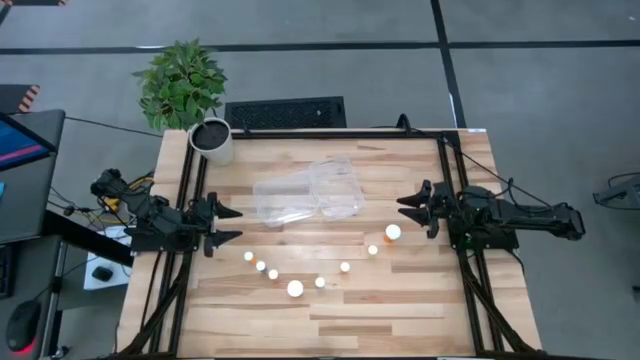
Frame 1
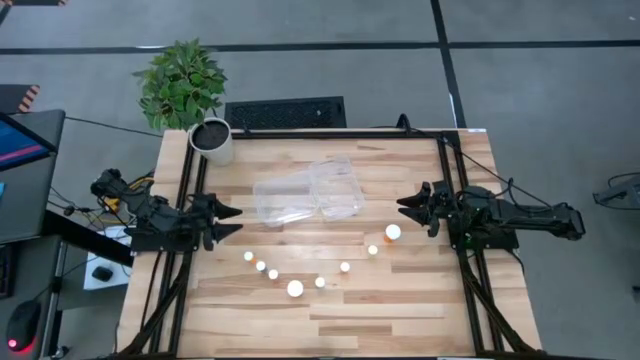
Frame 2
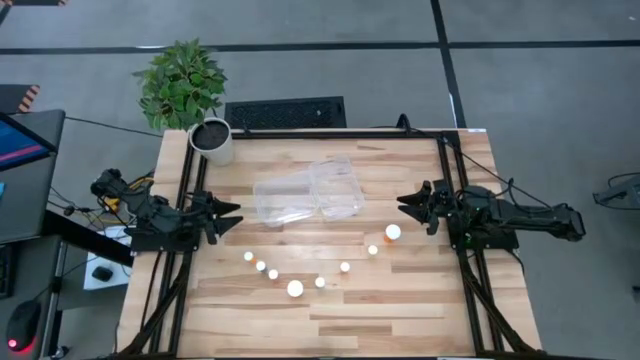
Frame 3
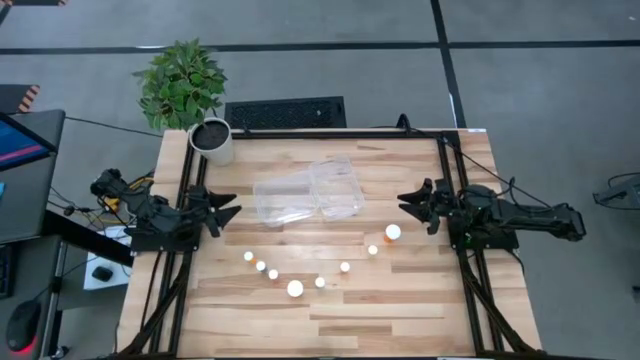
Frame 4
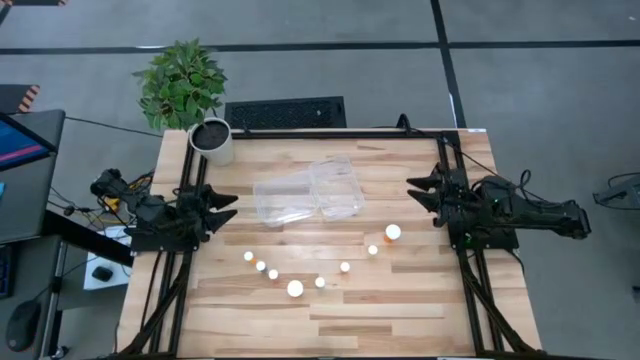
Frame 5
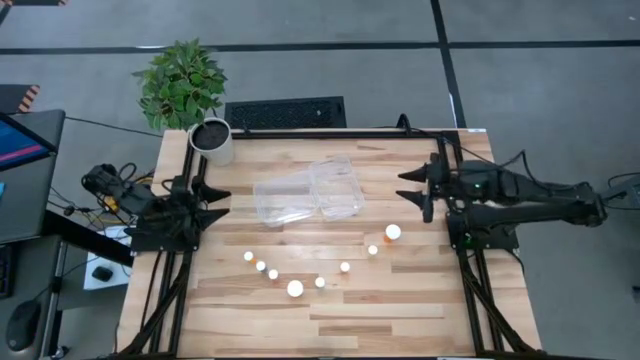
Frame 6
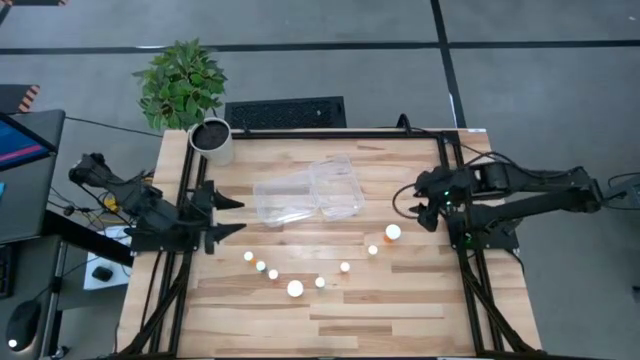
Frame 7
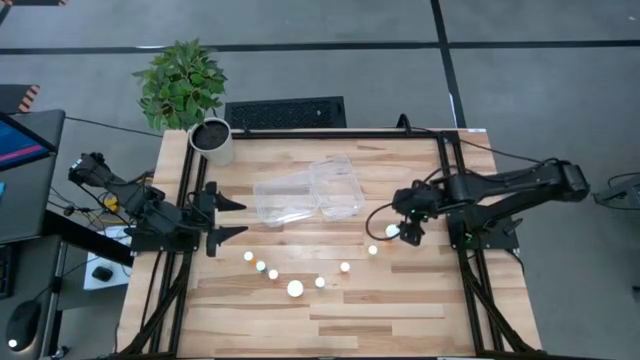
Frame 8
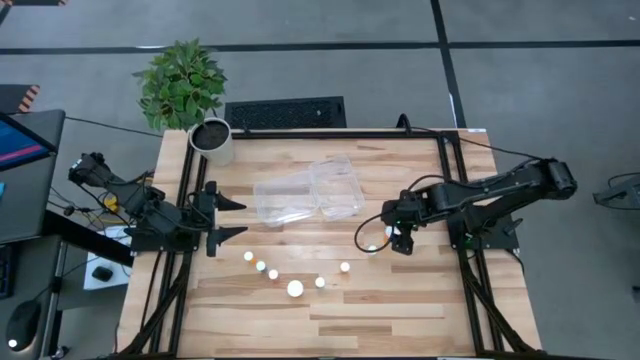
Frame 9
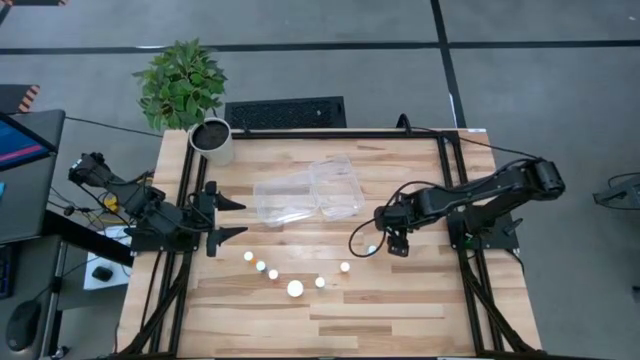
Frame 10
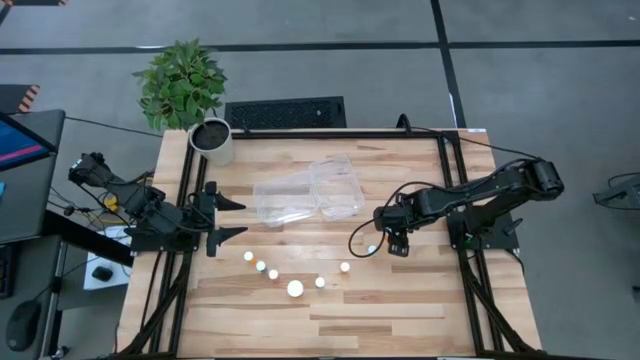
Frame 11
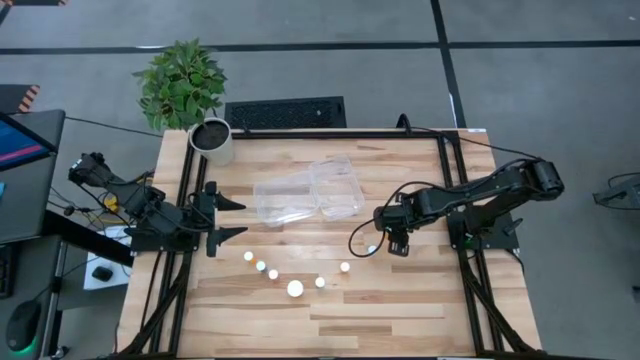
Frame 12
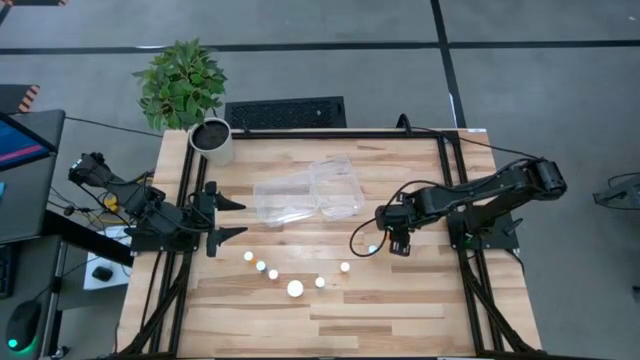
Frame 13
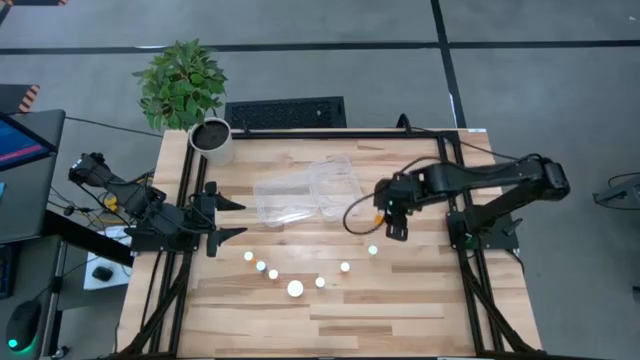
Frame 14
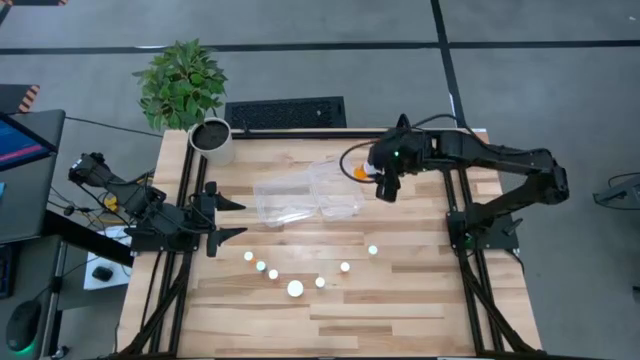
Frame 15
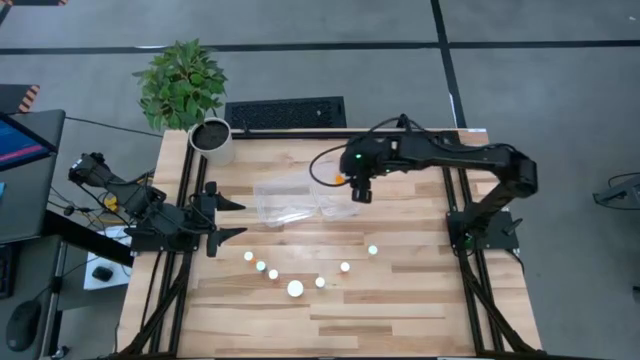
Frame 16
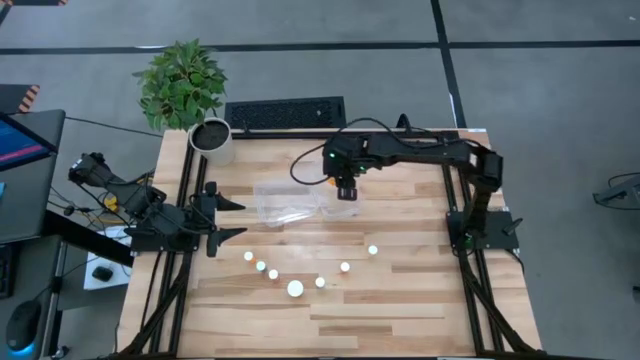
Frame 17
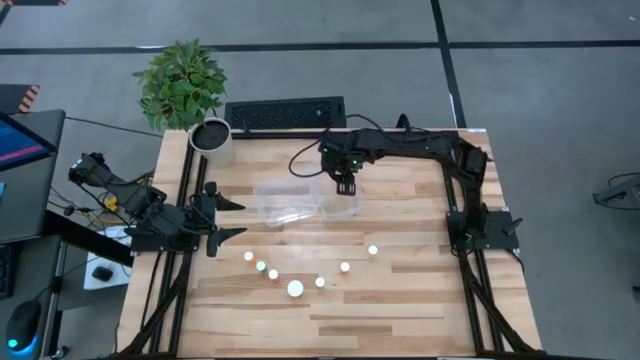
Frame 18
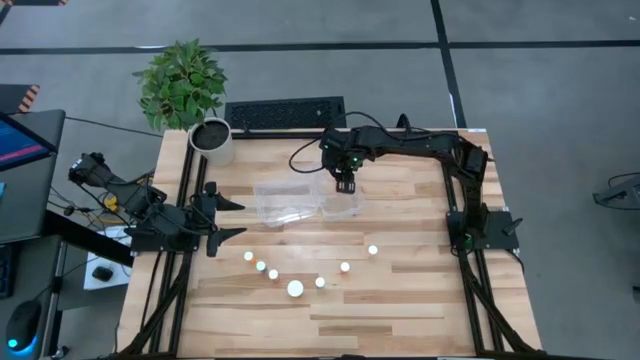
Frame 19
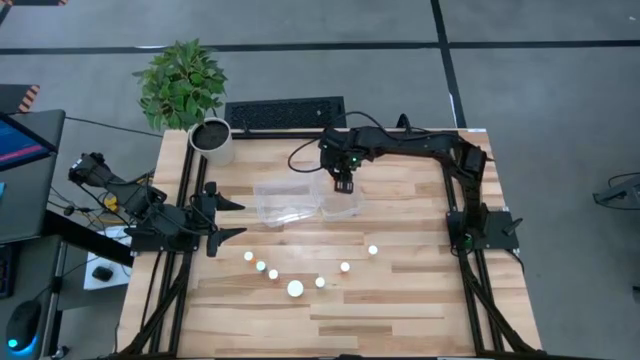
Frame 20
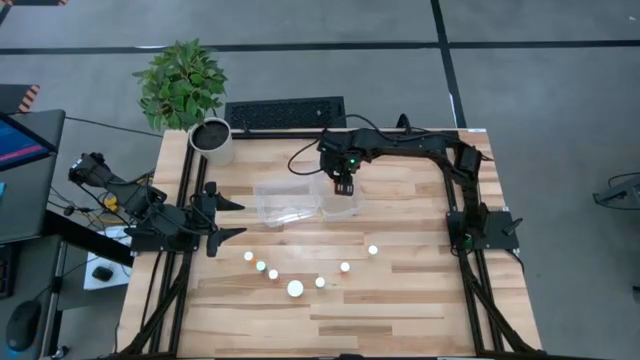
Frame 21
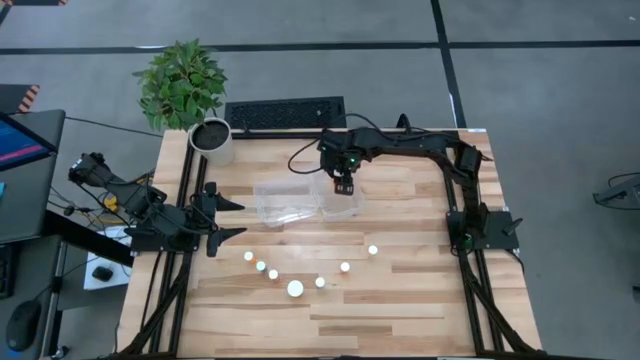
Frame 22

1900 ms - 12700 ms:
Task: Pick and place medicine bottles into bin by pill shape (circle, oval)
Put the orange capsule bottle into the right transparent bin

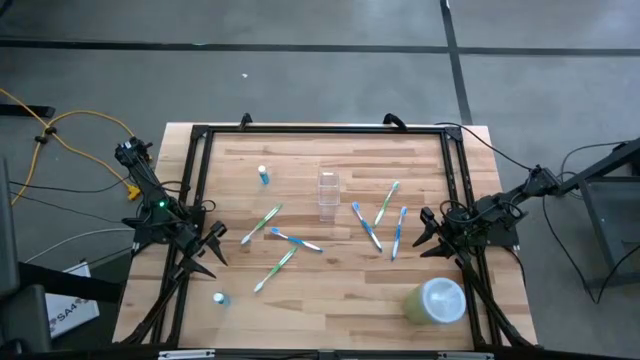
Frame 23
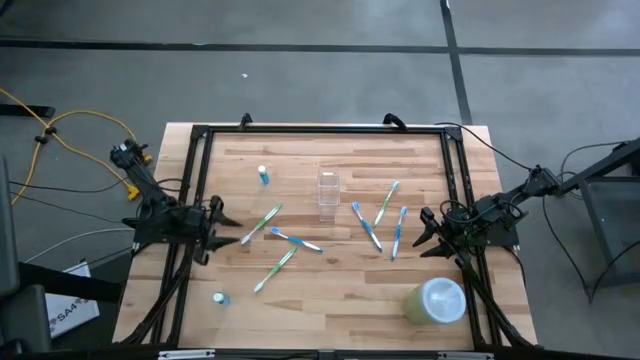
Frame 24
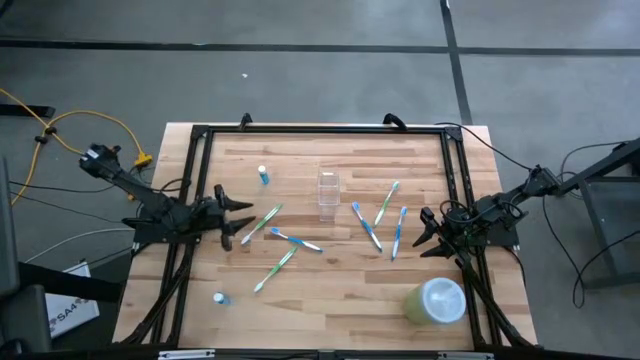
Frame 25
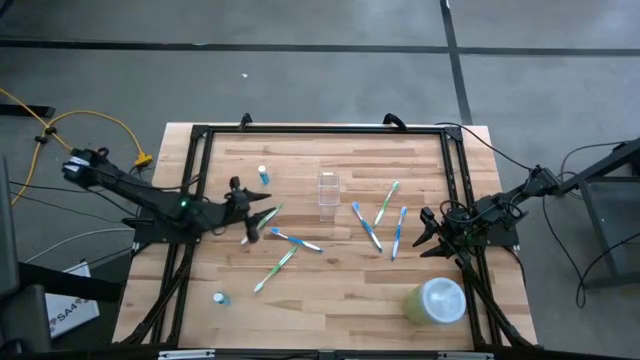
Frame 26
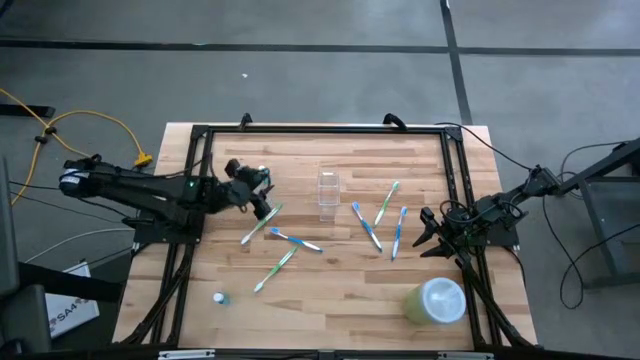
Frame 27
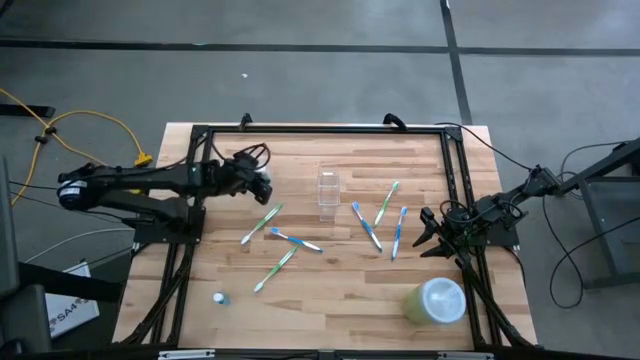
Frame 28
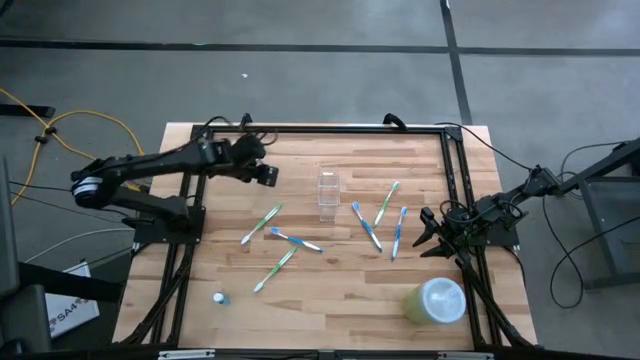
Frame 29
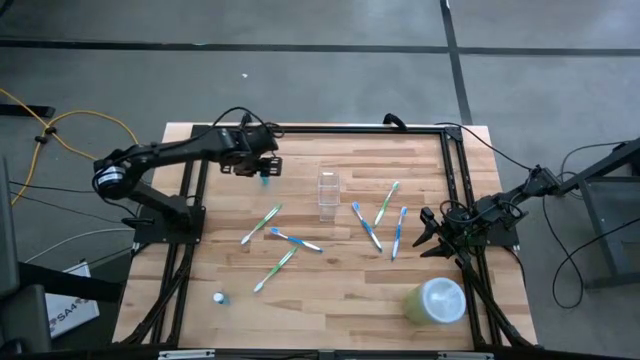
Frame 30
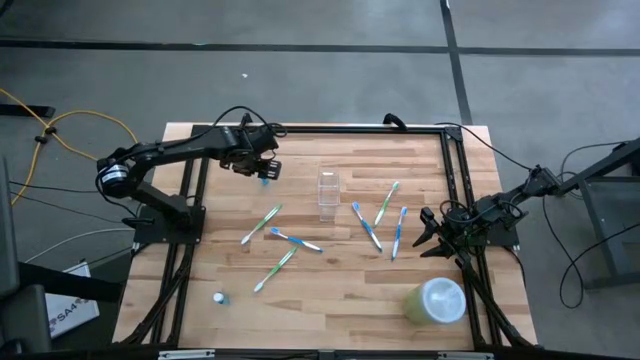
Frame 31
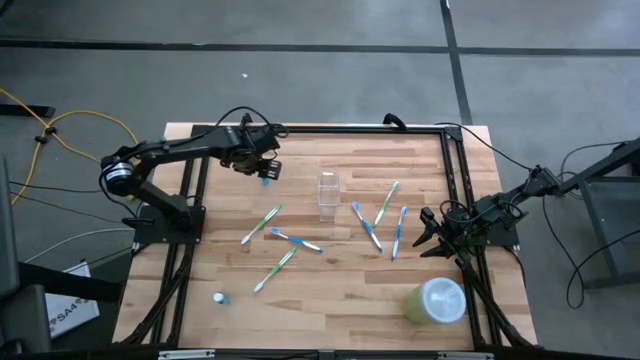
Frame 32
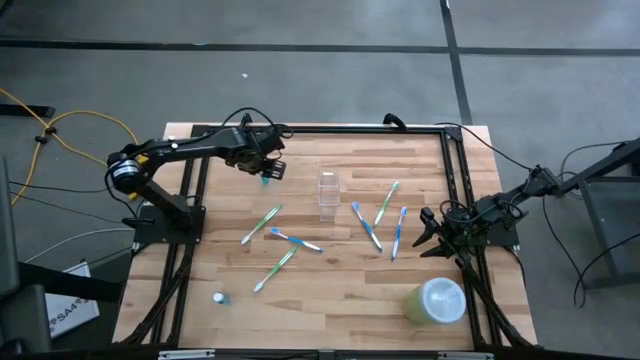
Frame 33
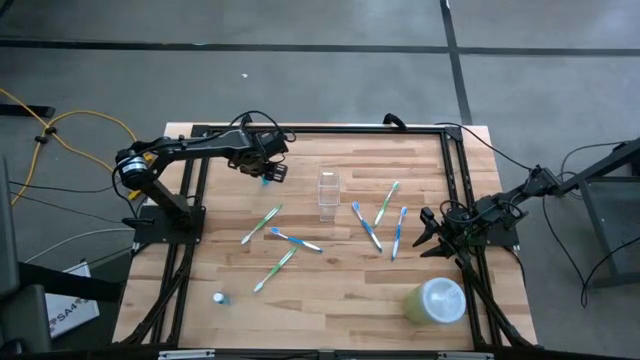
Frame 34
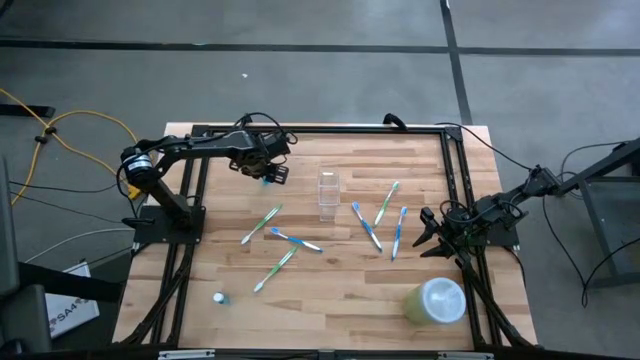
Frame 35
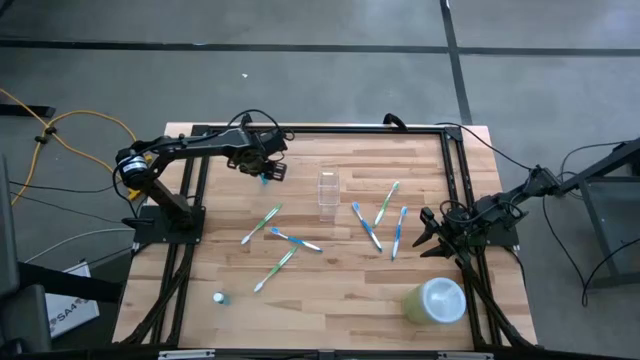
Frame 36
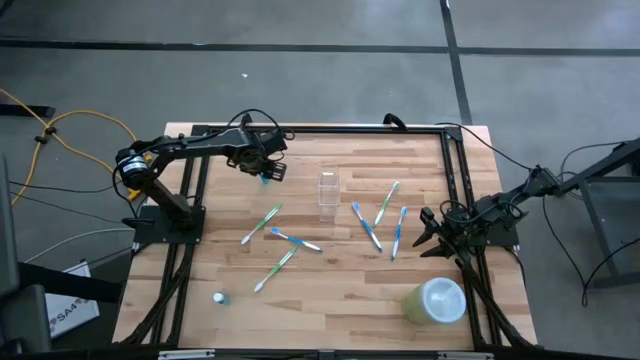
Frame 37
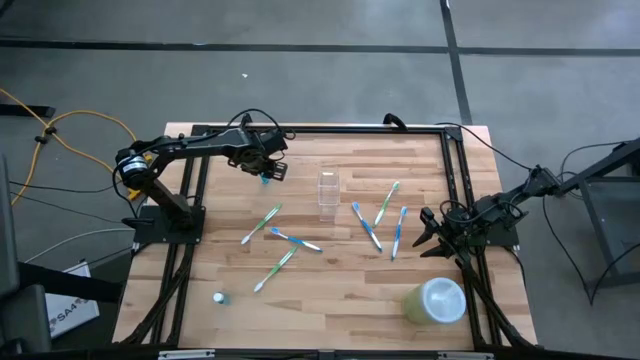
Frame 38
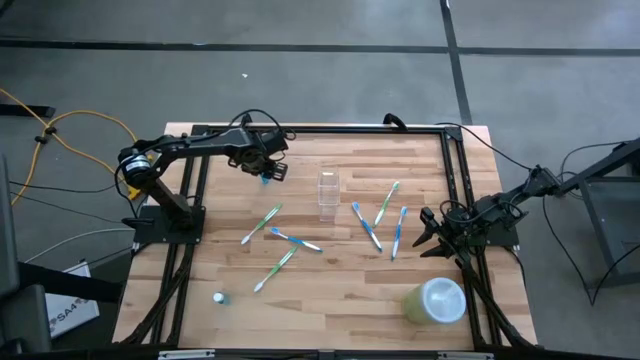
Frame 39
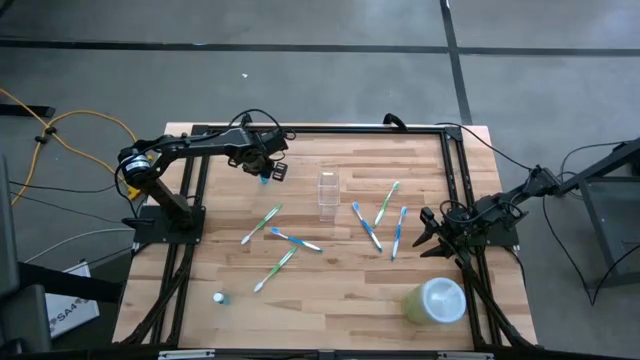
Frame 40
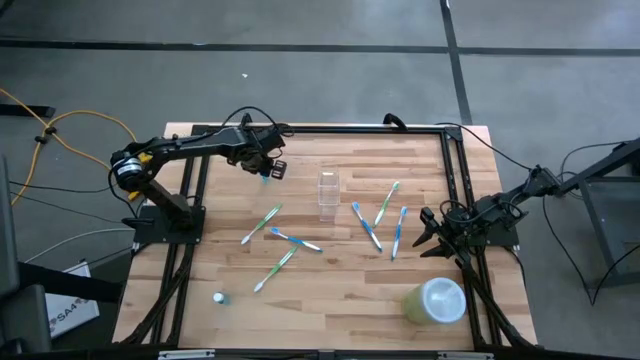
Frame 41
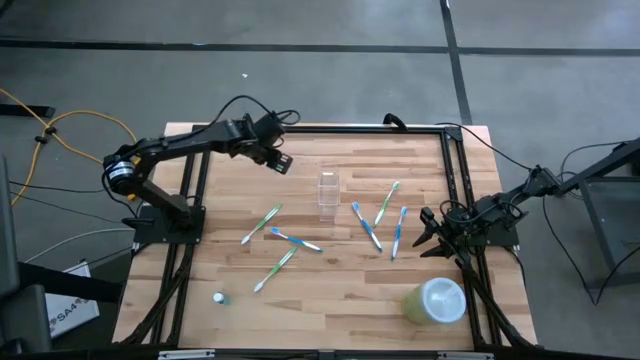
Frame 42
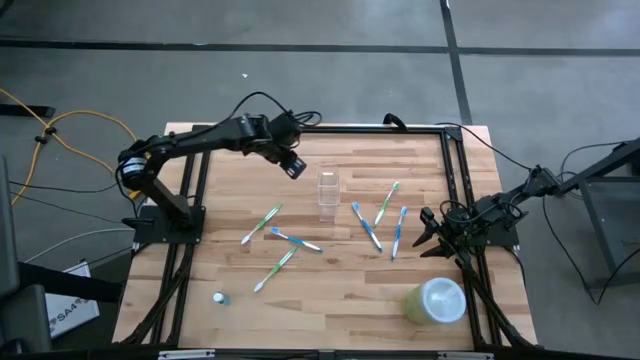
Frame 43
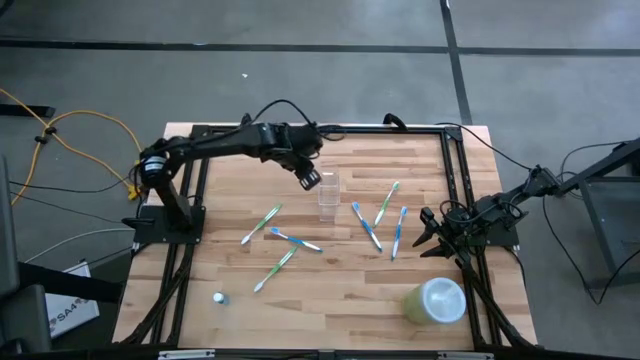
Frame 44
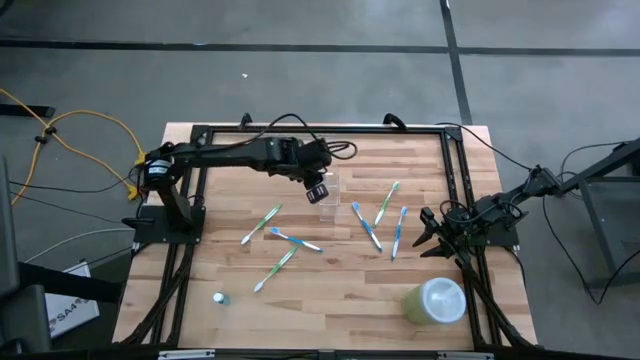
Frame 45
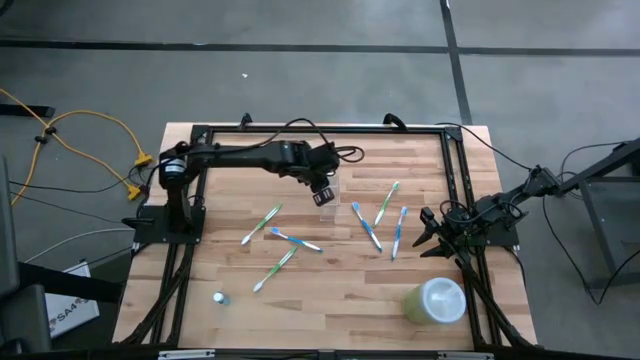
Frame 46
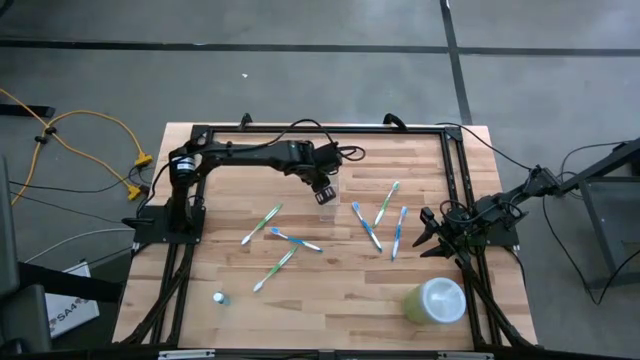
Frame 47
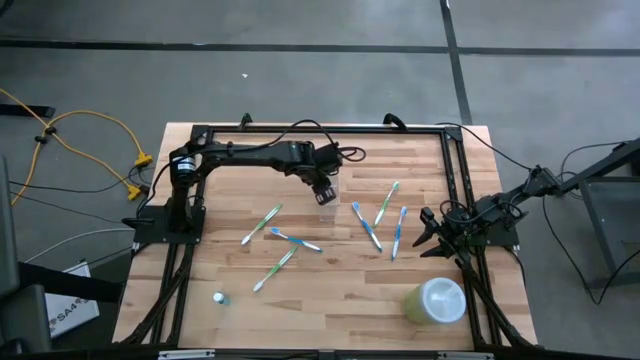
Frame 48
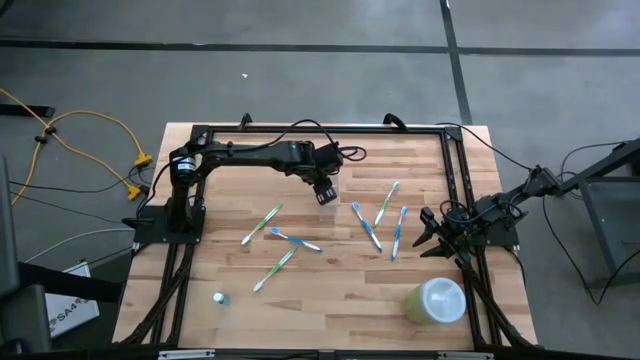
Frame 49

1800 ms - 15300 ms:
Task: Pick & Place toothbrushing station
Put the top blue mouthwash into the transparent organizer
